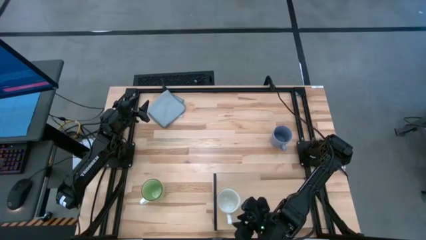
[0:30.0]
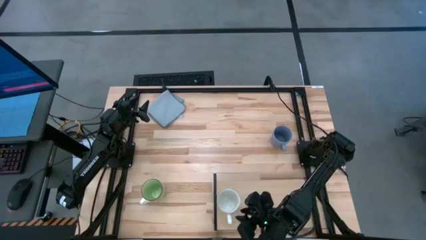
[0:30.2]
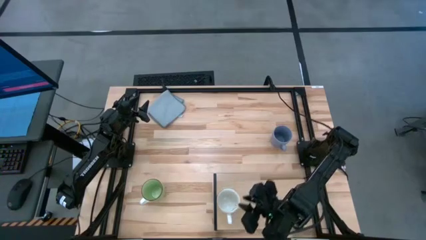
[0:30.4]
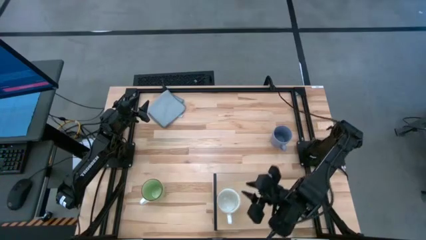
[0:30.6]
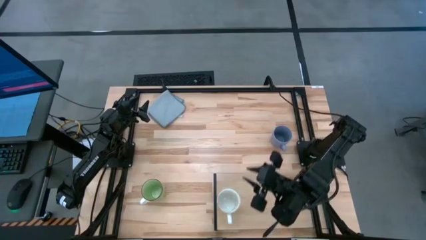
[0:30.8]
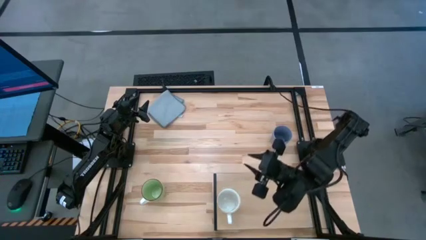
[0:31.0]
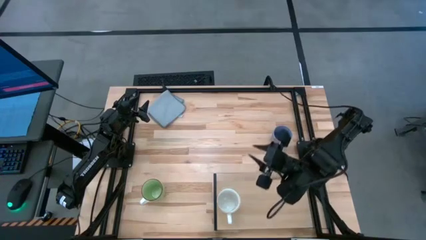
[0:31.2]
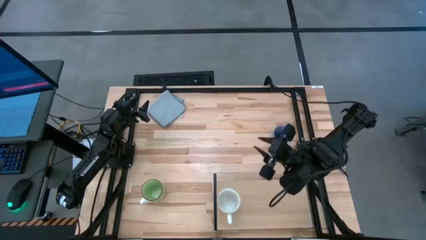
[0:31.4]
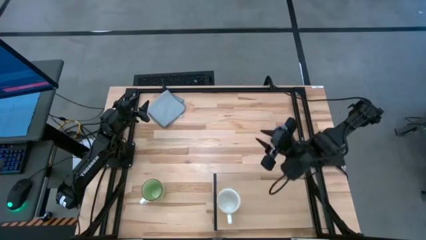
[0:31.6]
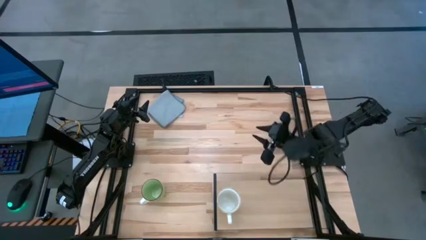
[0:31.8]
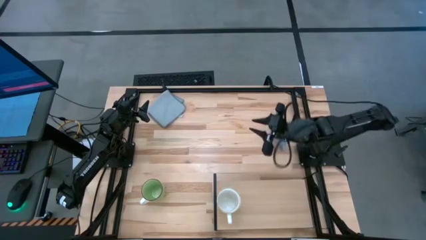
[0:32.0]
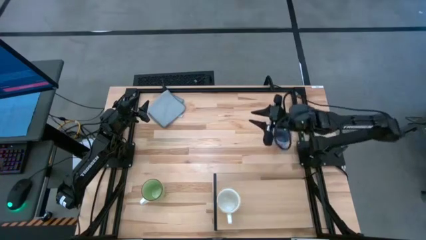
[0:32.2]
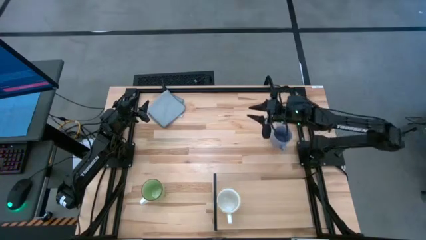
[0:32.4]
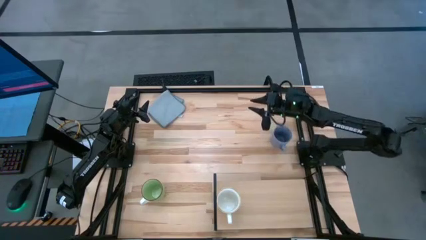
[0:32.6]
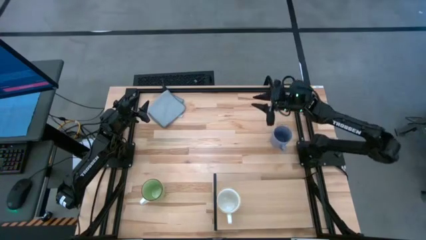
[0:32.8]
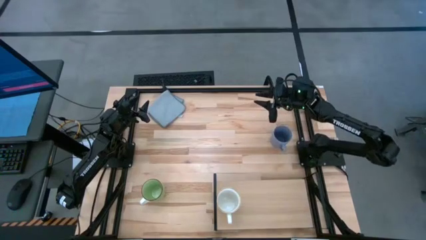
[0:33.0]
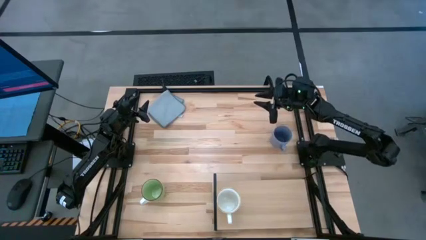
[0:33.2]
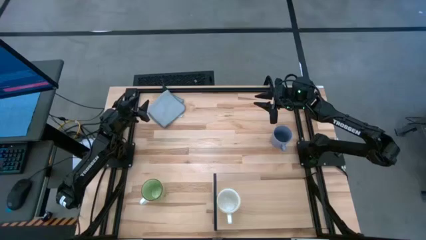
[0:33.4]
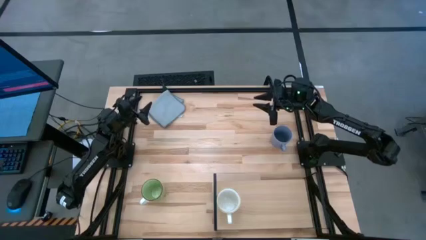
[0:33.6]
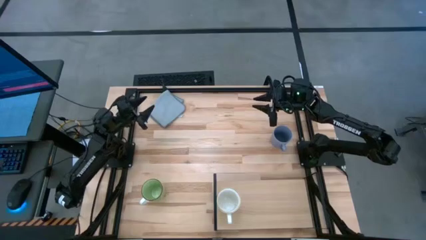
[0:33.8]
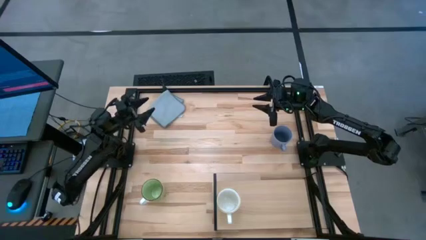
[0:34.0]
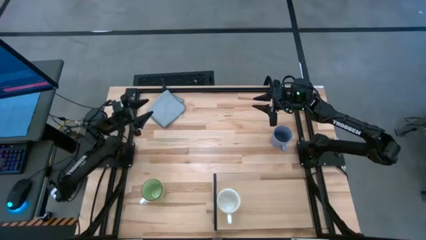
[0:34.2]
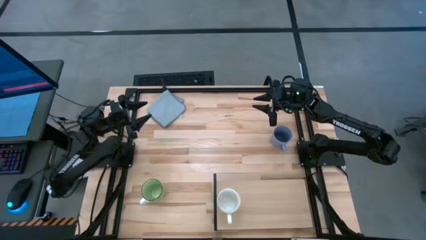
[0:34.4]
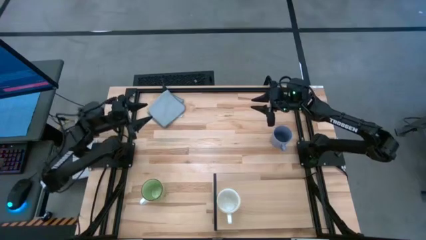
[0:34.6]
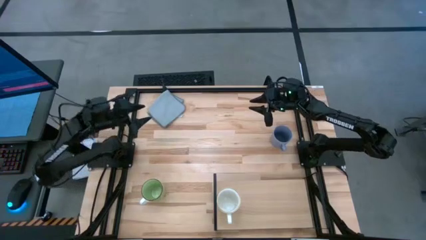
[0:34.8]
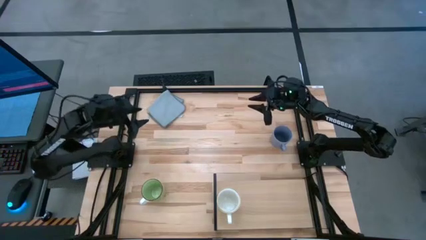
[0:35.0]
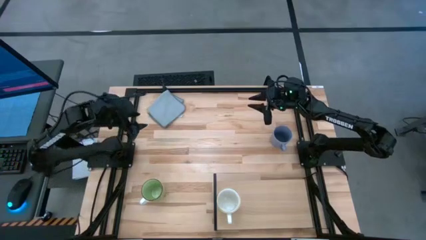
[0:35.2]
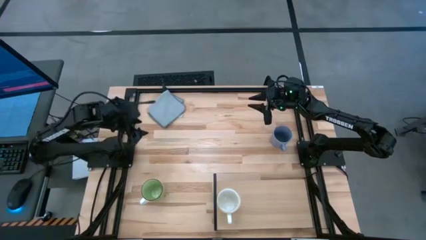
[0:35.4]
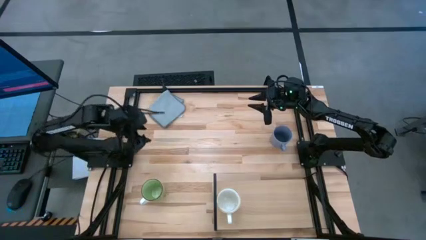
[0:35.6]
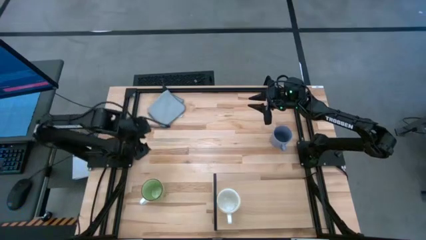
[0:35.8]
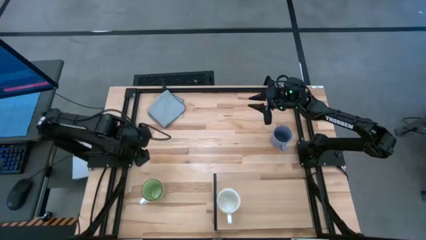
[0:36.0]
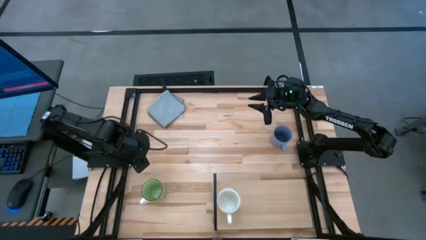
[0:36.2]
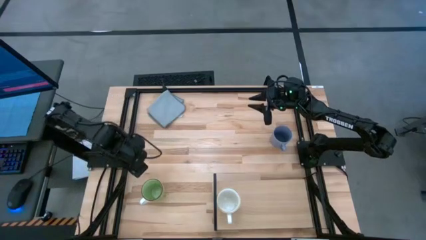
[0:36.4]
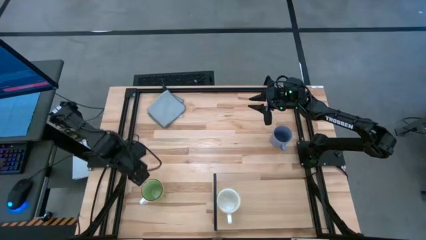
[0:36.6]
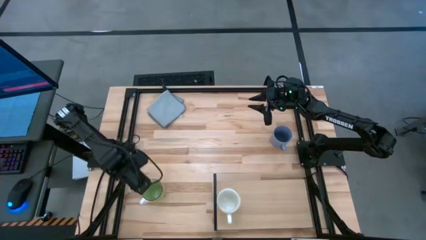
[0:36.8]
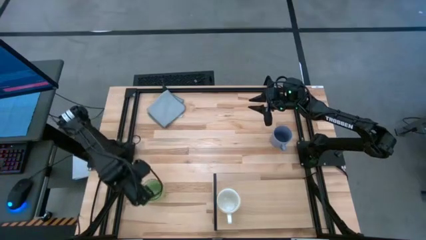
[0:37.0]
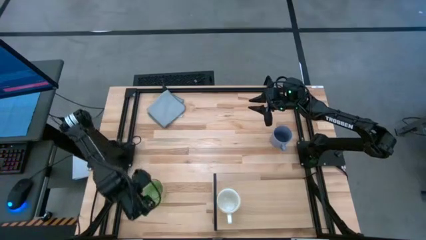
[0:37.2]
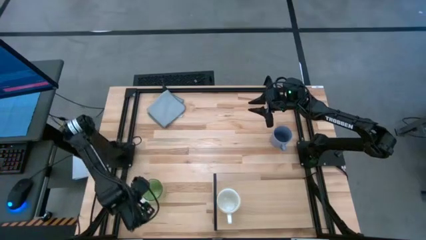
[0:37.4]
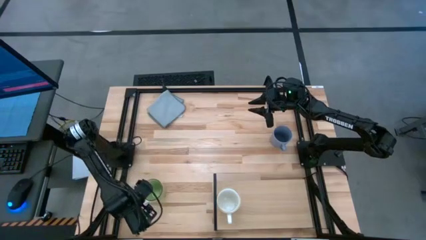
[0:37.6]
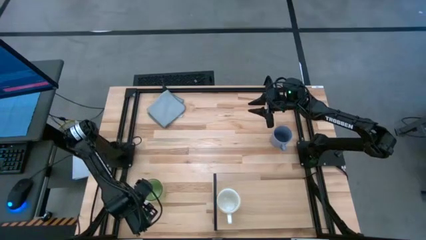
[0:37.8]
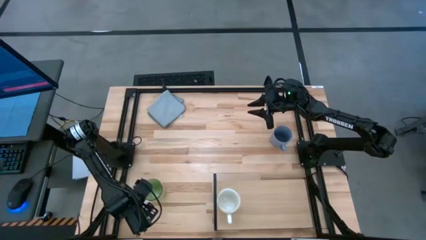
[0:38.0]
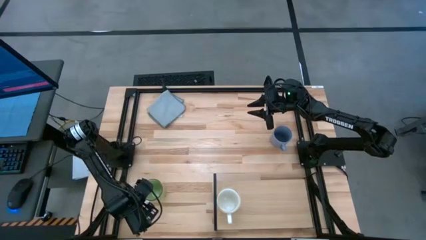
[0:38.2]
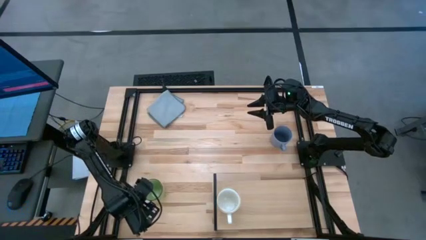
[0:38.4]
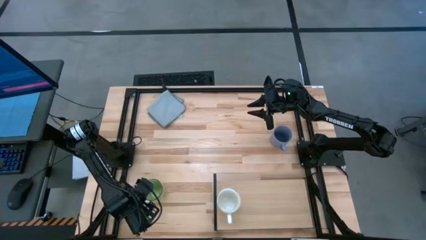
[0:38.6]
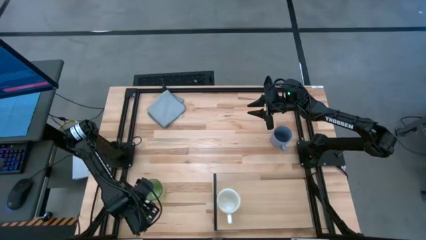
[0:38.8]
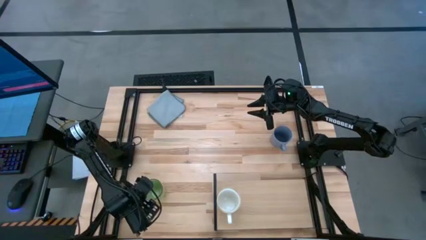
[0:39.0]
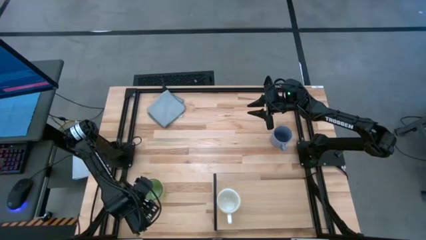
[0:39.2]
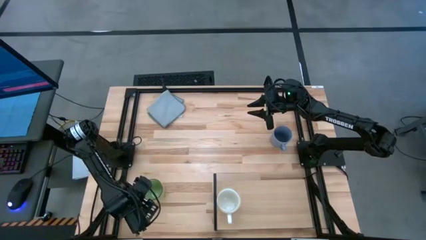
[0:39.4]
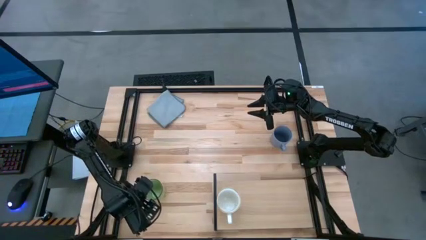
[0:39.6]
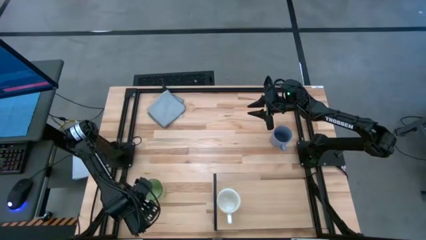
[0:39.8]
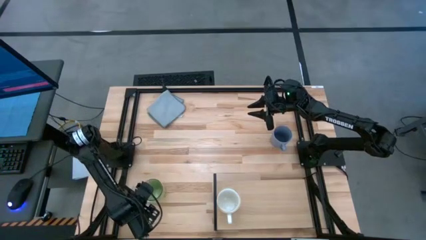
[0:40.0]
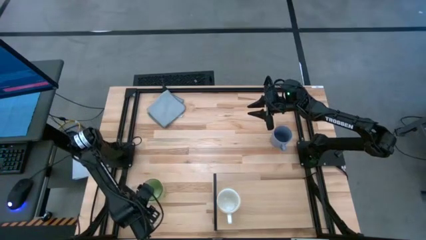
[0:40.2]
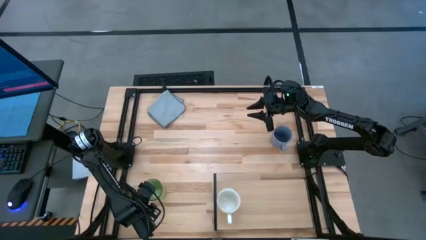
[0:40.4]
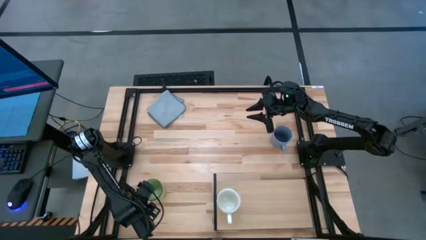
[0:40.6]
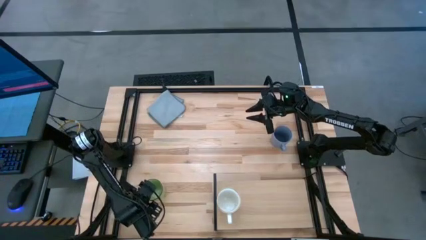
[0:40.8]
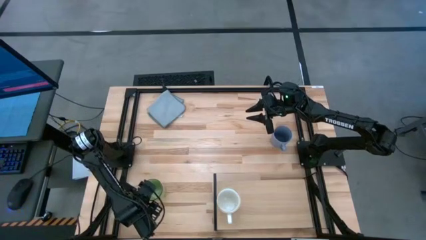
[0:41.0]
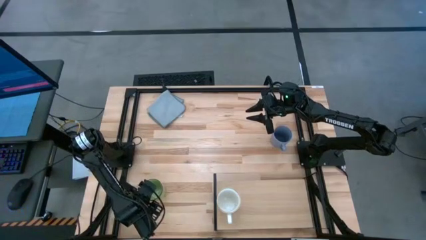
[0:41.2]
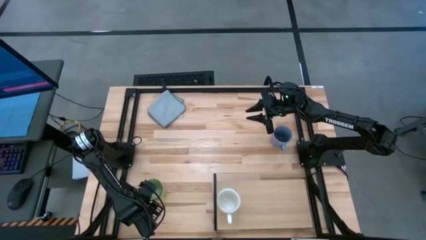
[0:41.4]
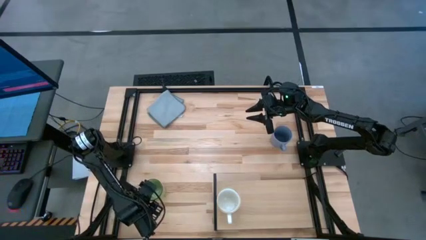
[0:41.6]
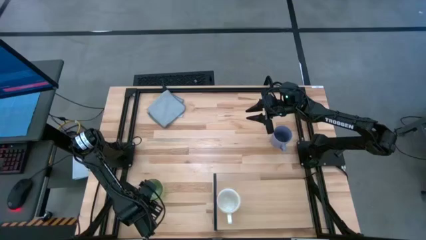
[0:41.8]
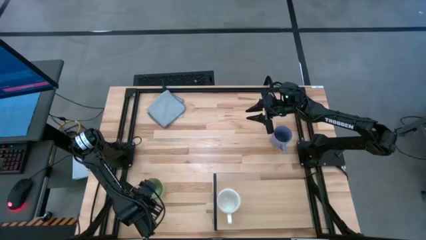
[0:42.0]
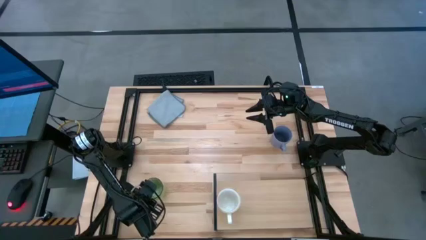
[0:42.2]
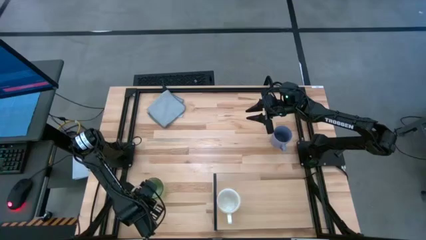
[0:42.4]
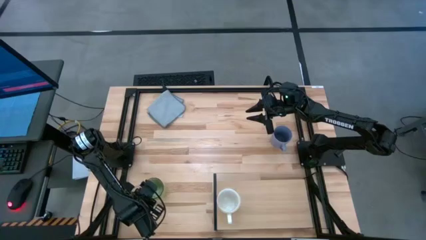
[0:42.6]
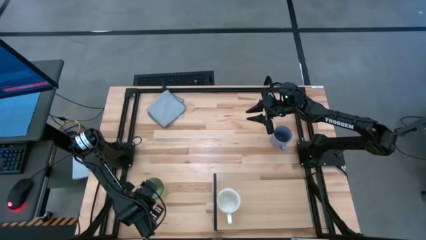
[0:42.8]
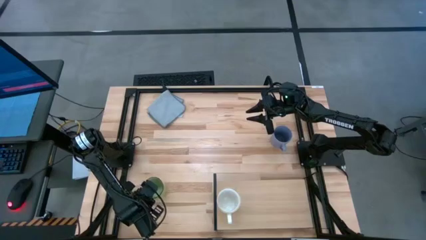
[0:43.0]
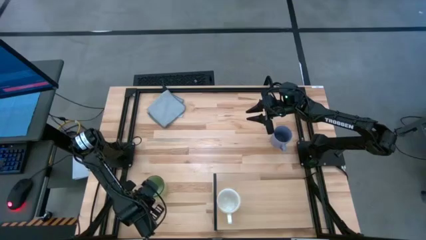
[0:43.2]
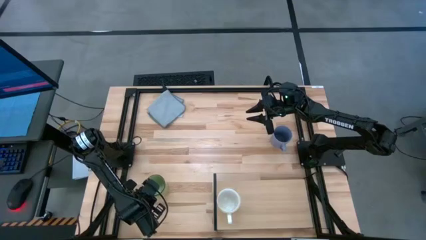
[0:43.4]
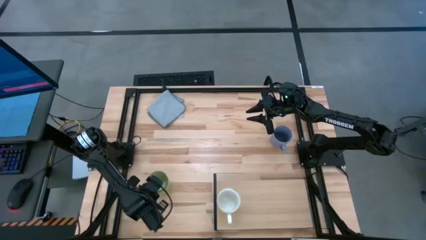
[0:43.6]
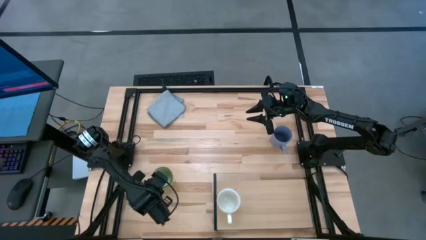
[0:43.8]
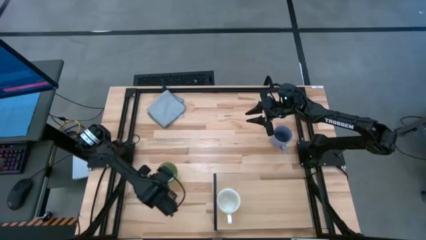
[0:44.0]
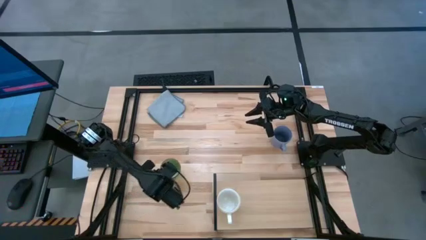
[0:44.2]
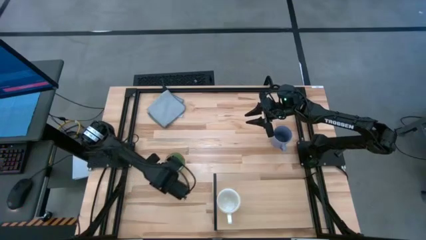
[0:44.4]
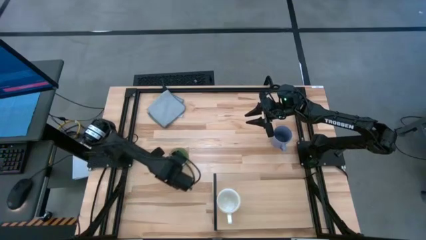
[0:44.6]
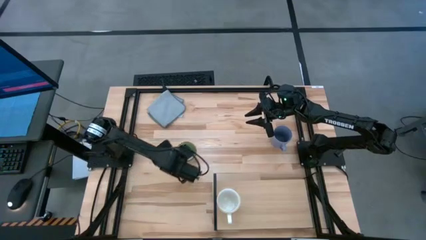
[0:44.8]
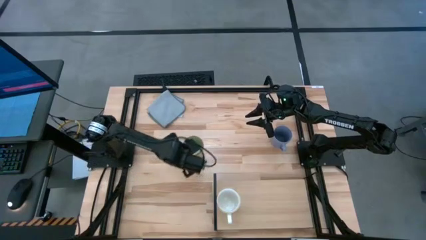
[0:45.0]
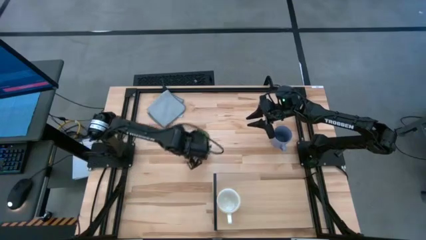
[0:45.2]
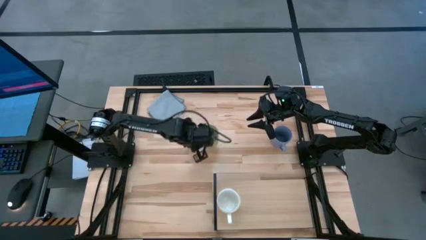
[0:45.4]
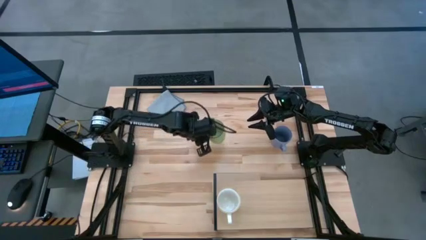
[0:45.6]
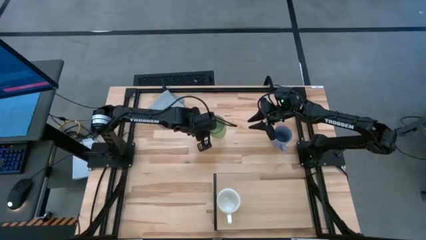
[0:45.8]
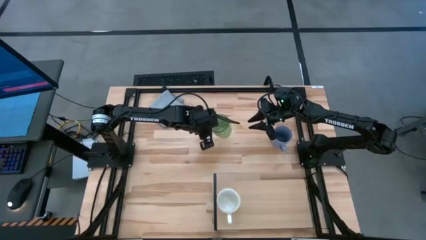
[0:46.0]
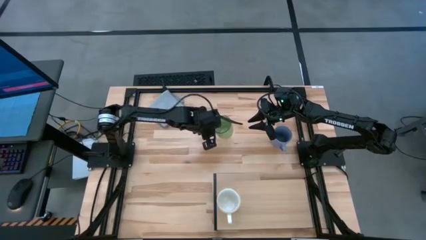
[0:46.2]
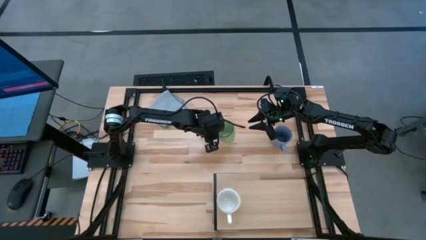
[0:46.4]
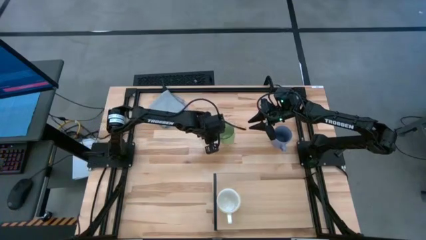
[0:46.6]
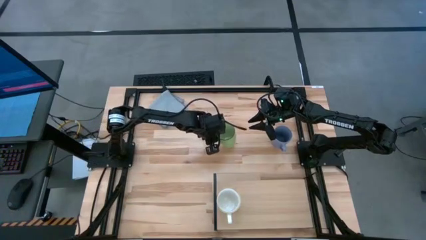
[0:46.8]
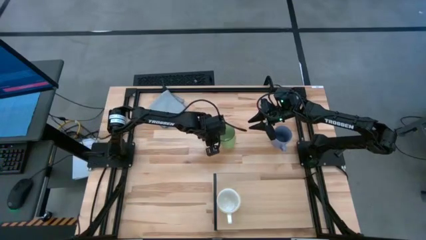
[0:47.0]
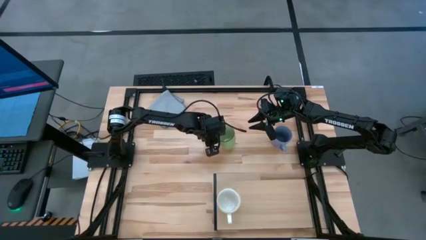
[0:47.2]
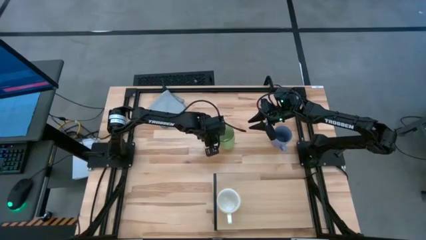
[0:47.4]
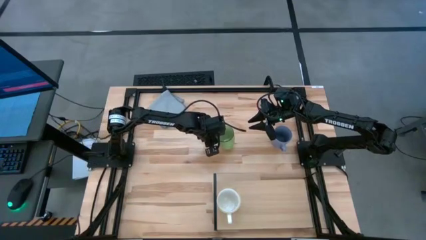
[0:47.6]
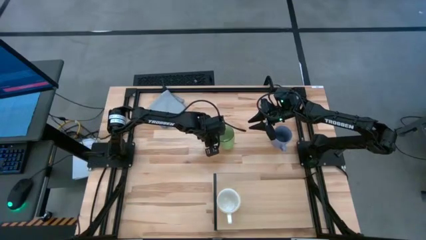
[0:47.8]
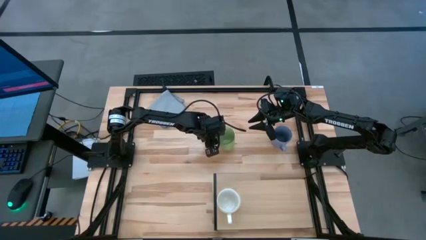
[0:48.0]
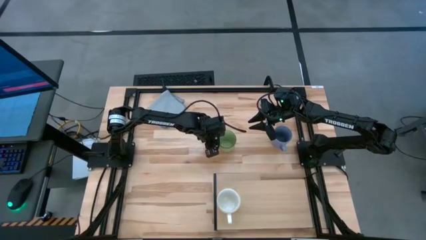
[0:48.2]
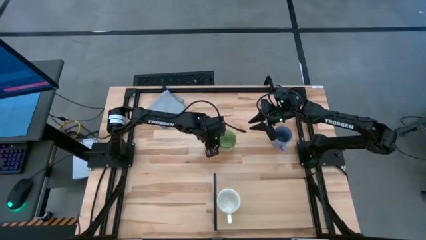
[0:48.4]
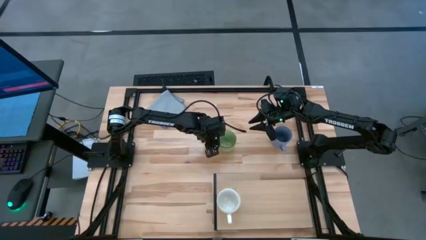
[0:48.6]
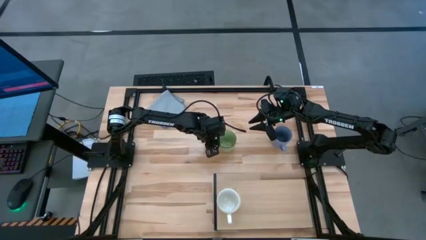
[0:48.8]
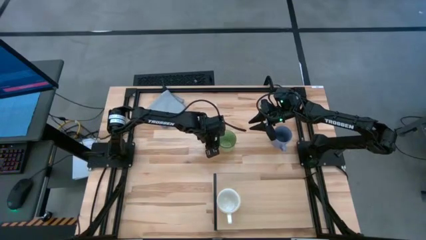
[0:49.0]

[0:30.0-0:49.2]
Task: Stack small to large cups/mugs on shelf
Put the green cup on the table
